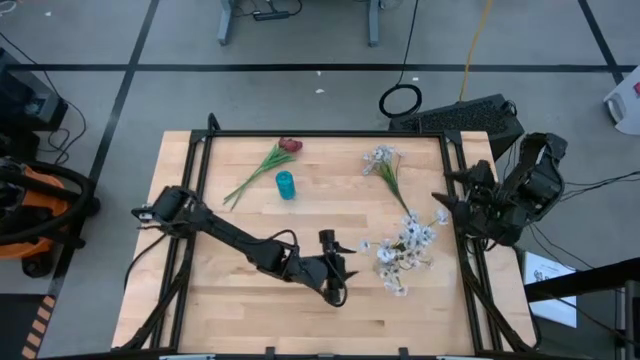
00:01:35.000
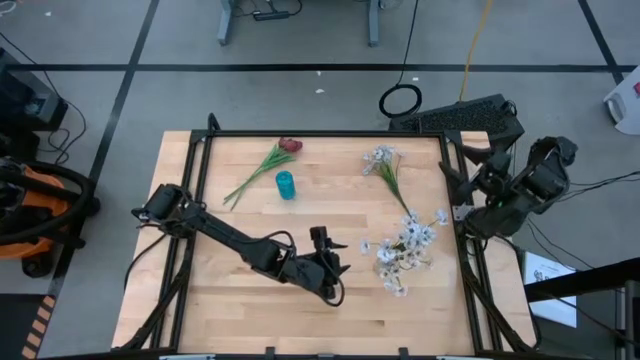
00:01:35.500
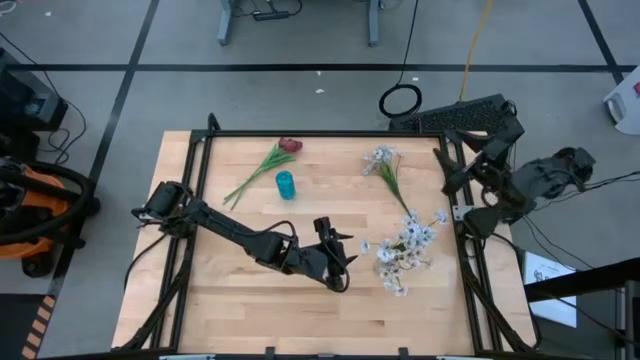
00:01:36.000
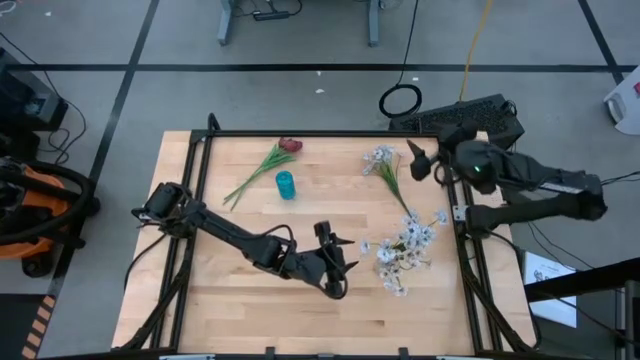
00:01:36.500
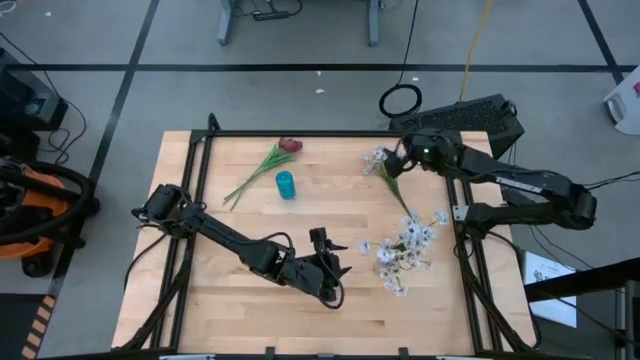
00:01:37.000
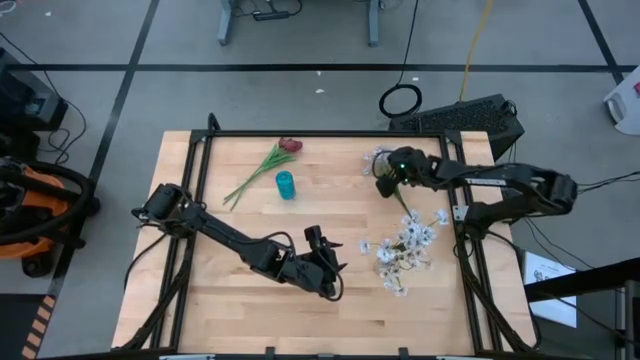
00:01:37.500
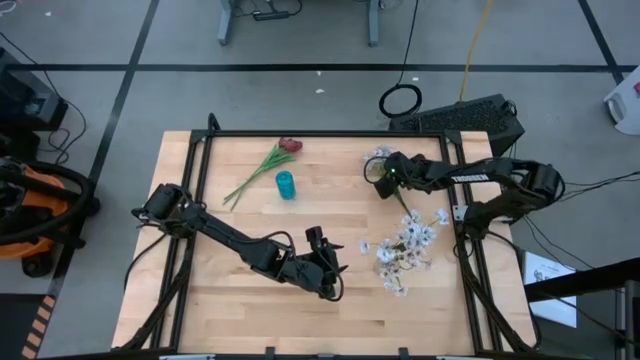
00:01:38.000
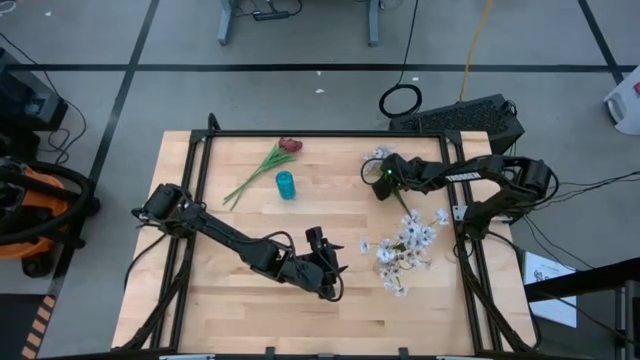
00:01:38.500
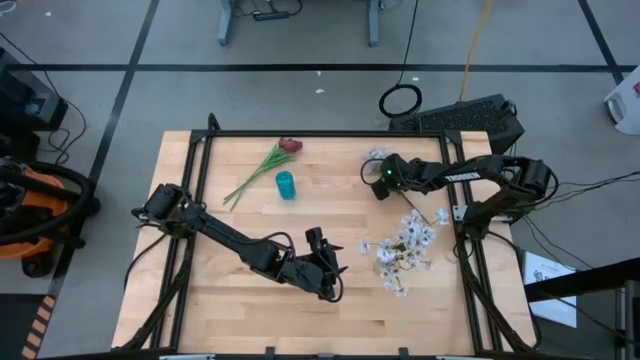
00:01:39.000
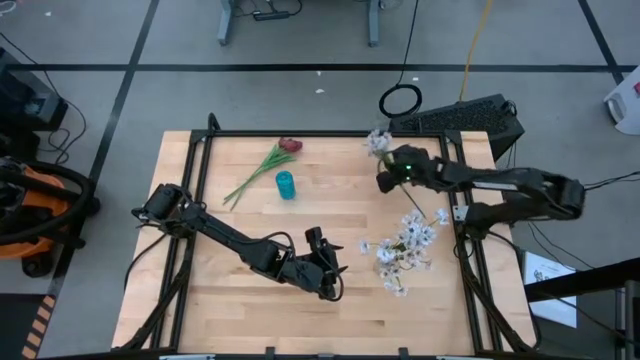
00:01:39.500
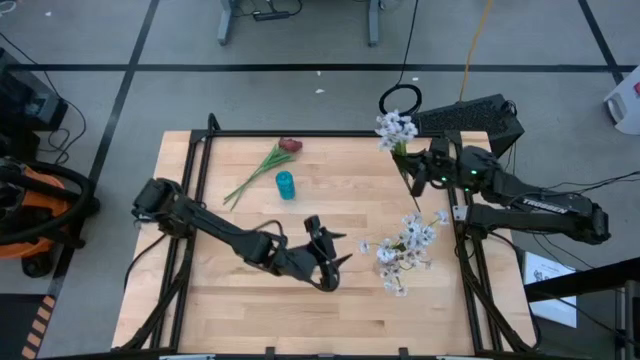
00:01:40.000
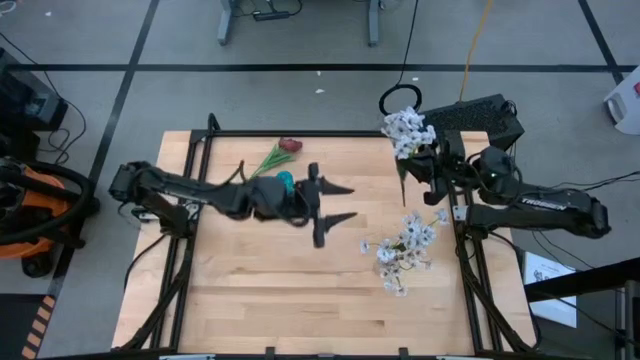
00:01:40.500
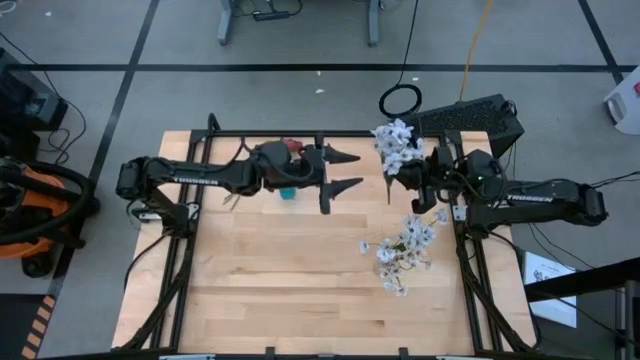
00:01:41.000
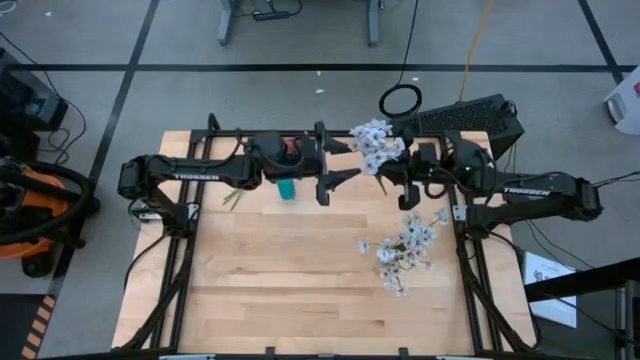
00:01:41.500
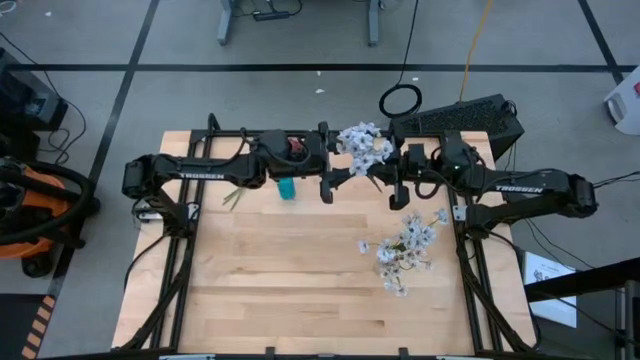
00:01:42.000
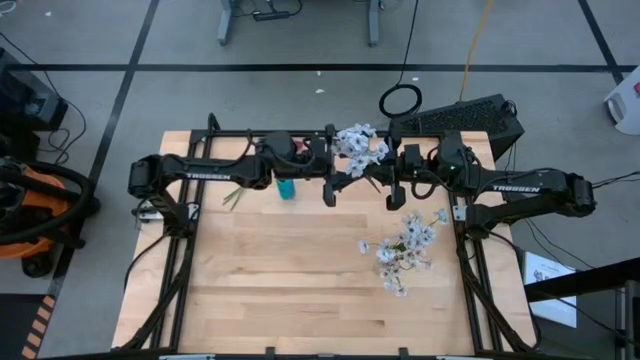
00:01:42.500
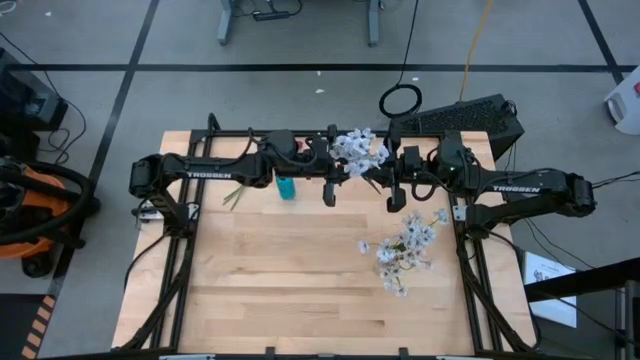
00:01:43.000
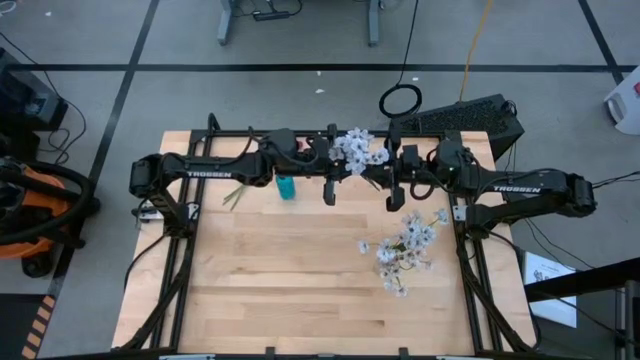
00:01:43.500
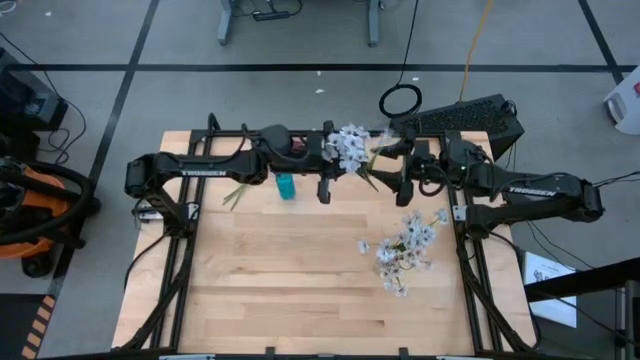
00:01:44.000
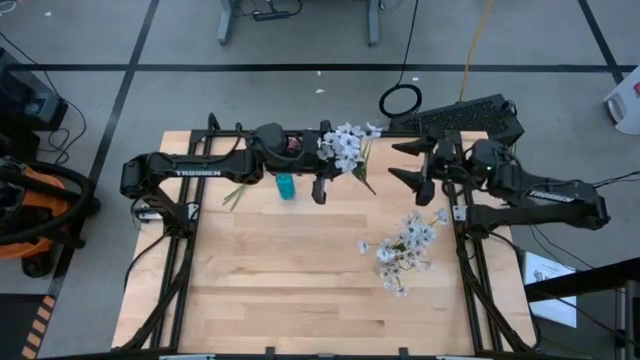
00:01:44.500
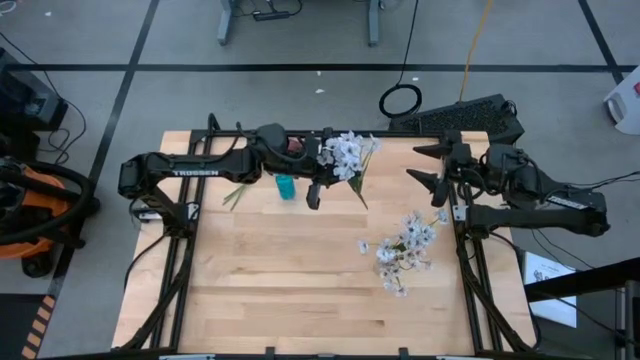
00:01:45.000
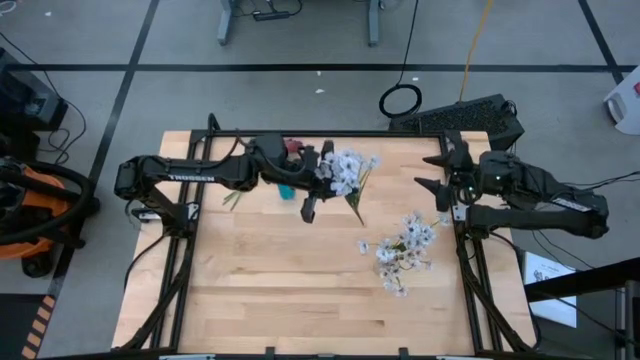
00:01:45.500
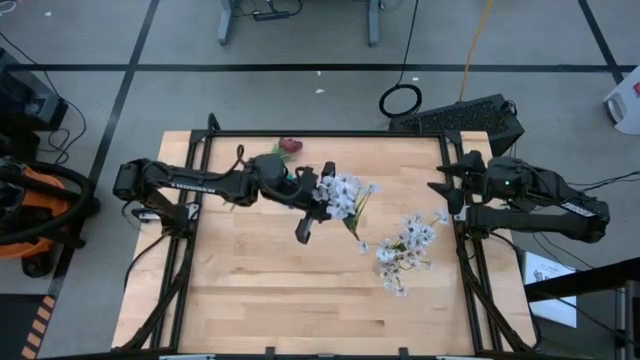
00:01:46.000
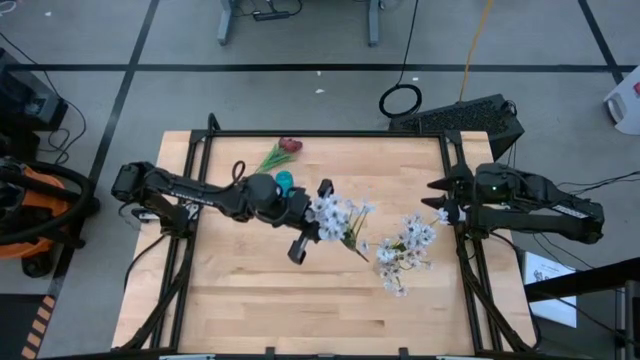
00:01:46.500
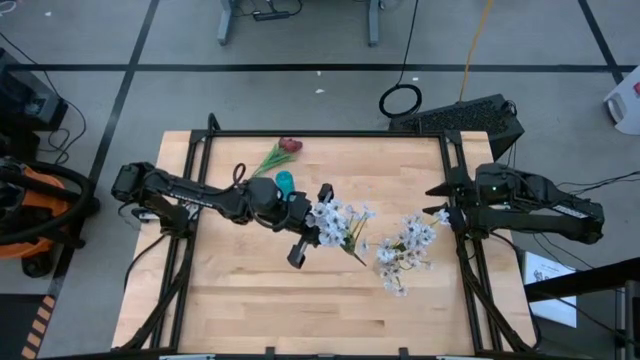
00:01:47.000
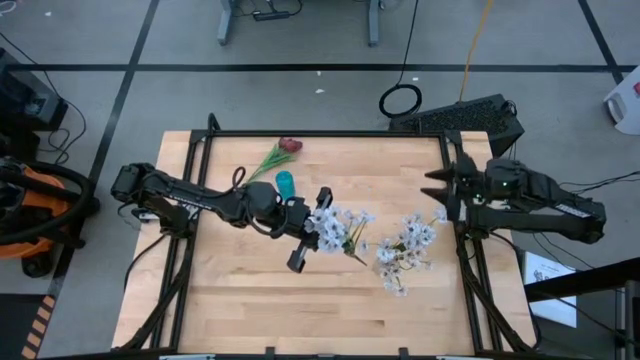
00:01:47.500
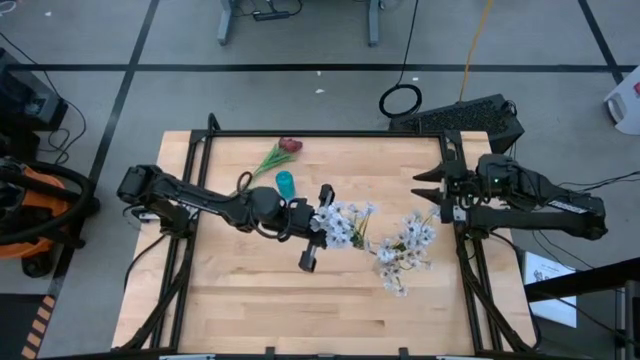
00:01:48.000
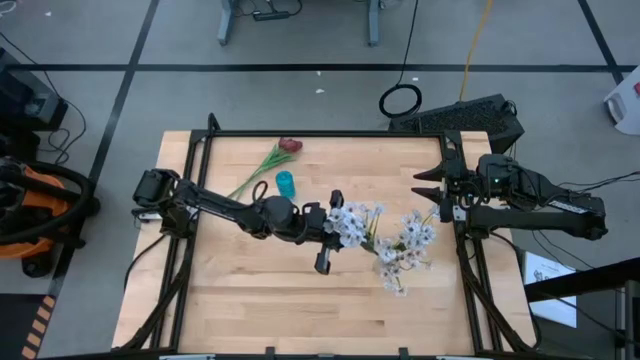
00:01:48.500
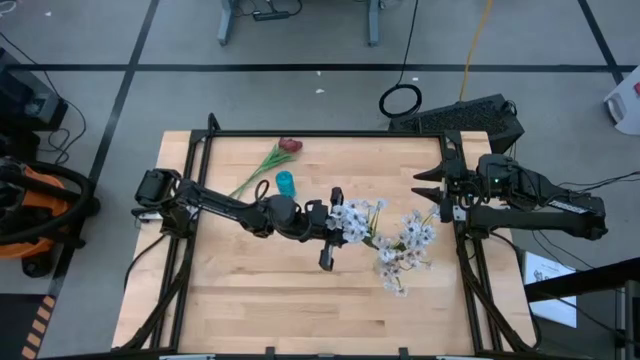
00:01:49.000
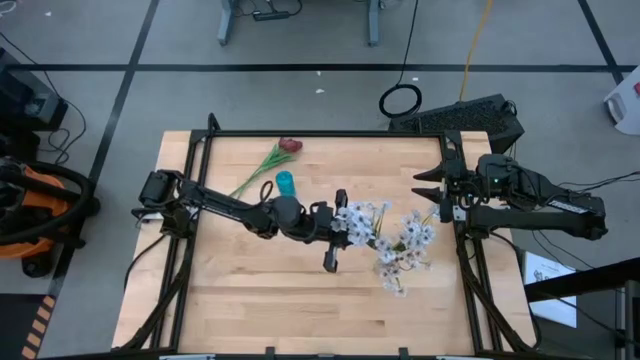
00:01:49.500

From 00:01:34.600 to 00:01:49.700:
Task: Sort flowers into vase by color
Put the white flowers into the transparent vase

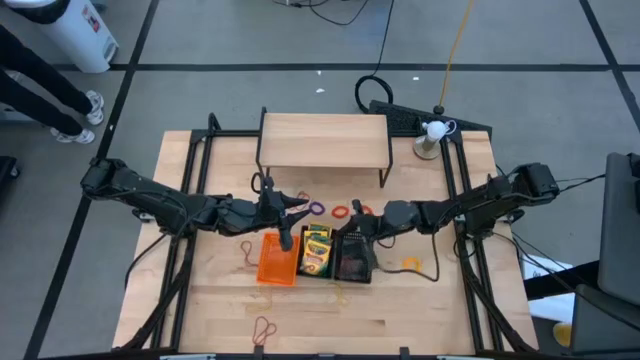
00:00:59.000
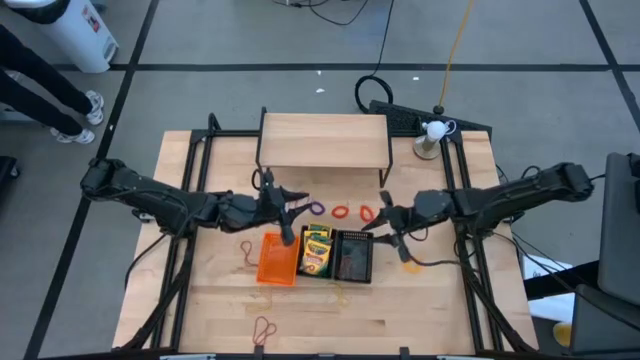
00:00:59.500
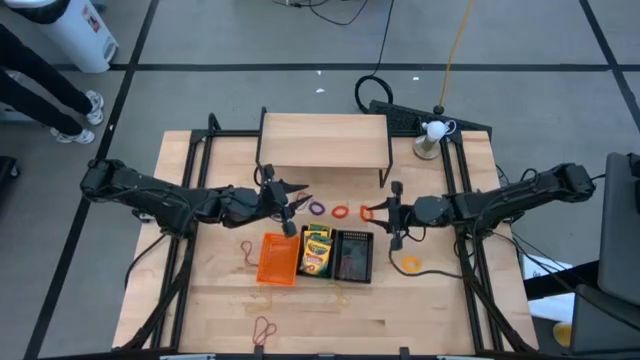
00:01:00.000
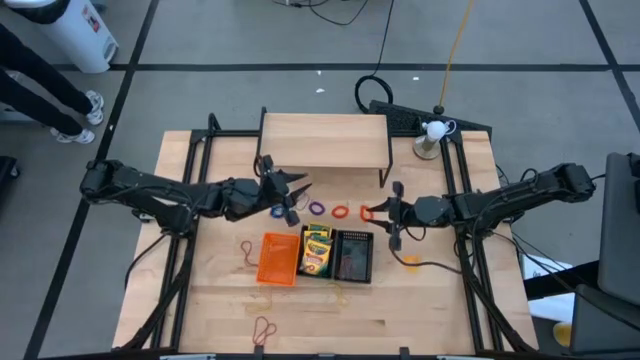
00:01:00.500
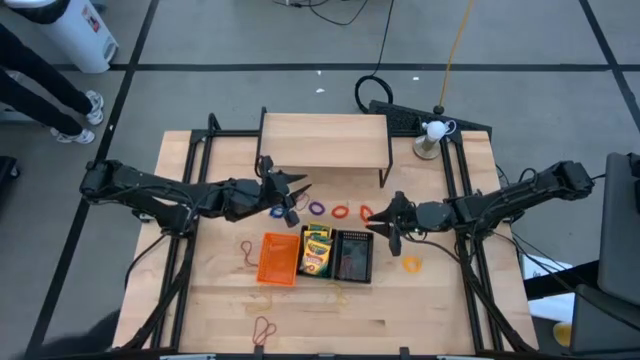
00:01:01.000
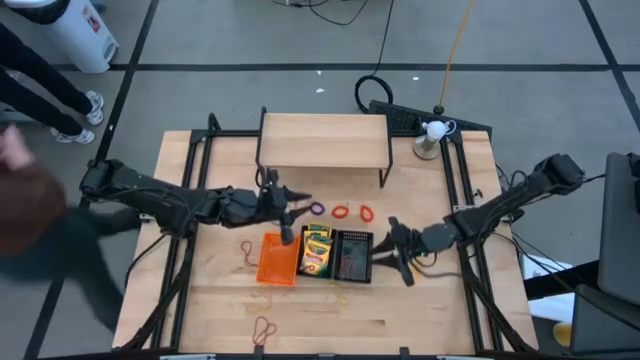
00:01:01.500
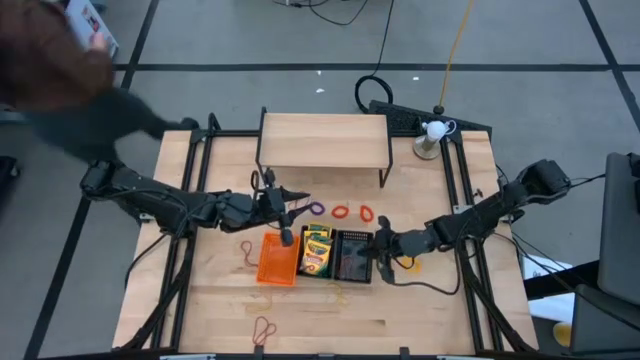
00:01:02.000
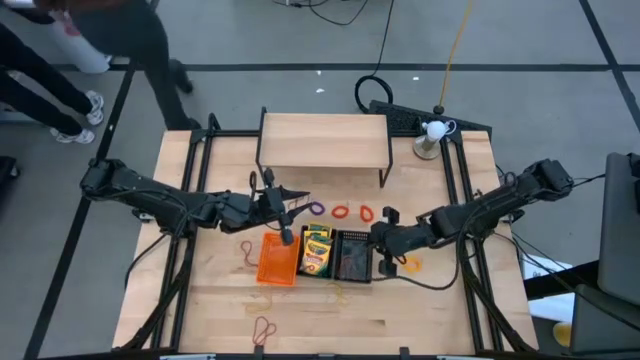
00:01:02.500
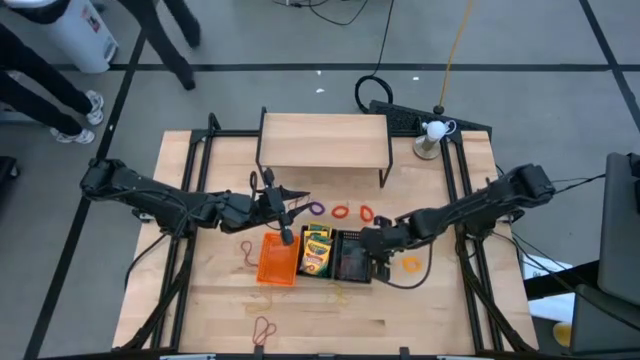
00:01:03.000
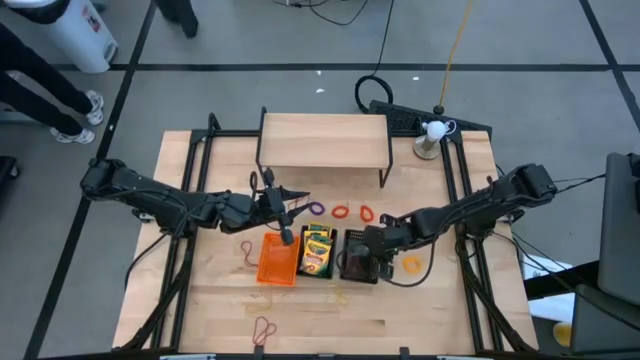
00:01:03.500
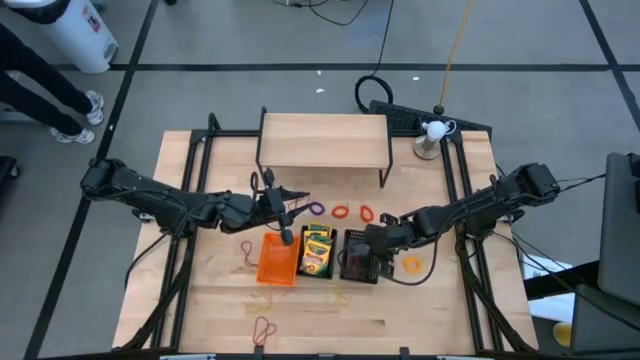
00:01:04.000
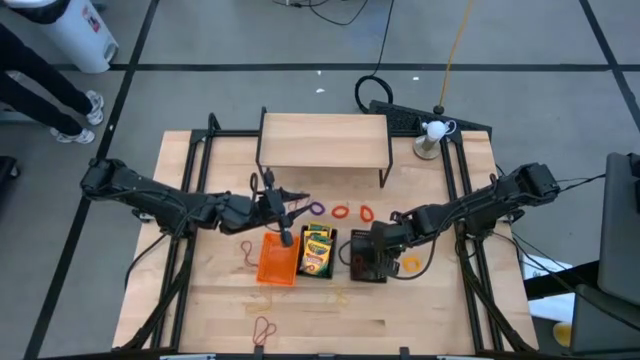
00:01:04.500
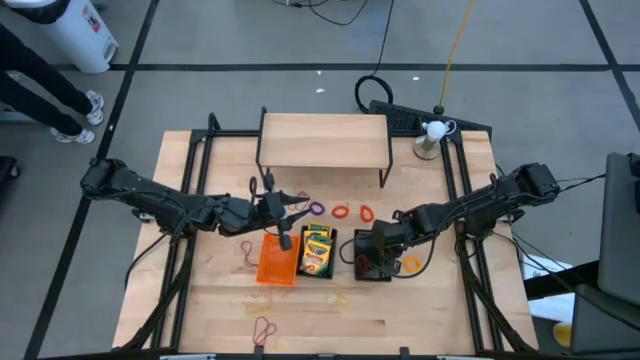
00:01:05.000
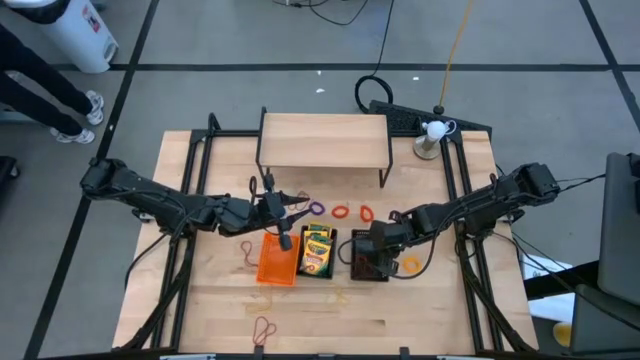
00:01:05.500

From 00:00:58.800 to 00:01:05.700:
Task: Pick & Place Office Desk Supplies
Adjust the right black bin
